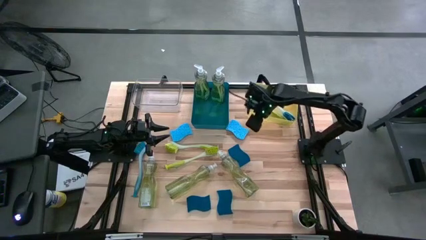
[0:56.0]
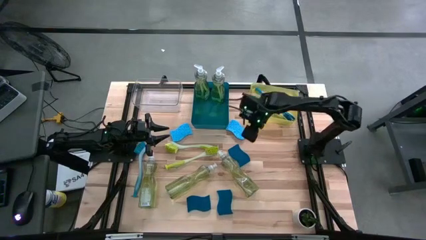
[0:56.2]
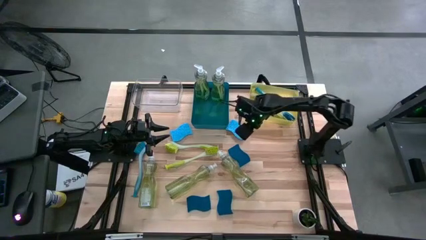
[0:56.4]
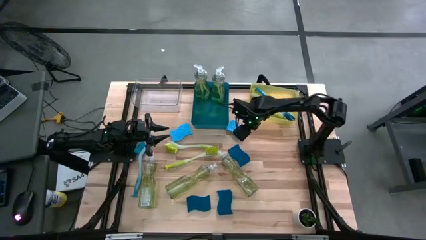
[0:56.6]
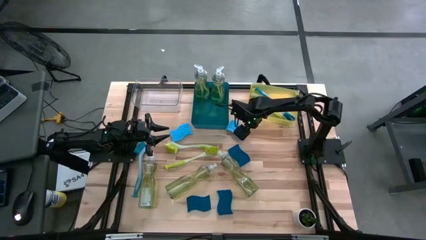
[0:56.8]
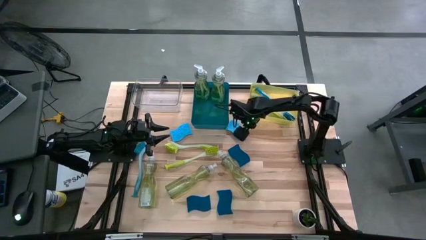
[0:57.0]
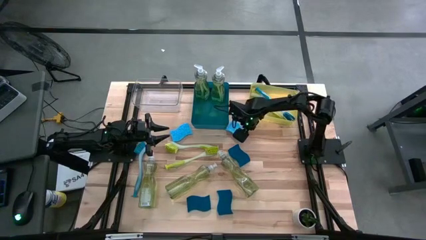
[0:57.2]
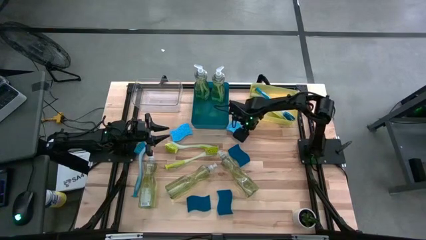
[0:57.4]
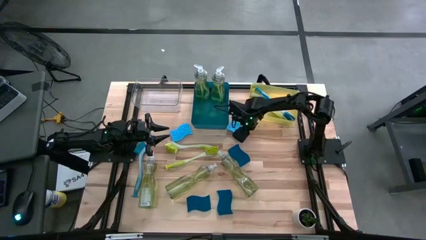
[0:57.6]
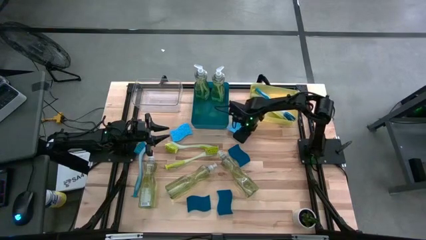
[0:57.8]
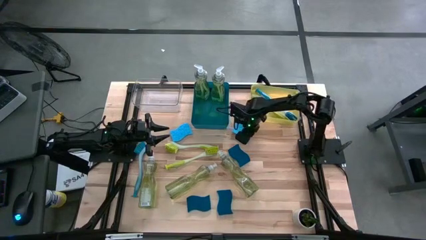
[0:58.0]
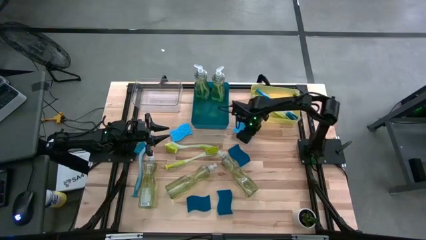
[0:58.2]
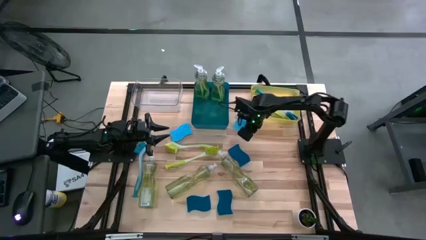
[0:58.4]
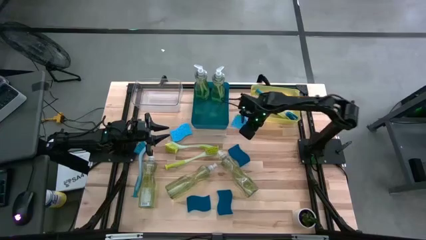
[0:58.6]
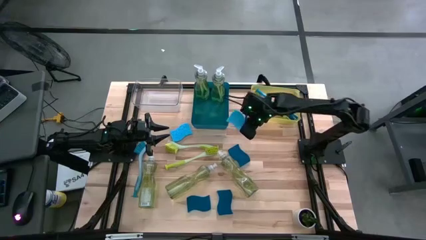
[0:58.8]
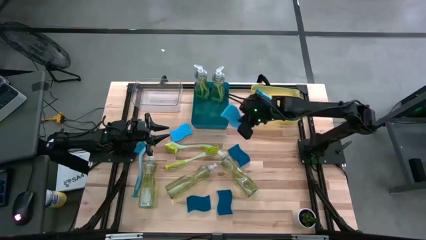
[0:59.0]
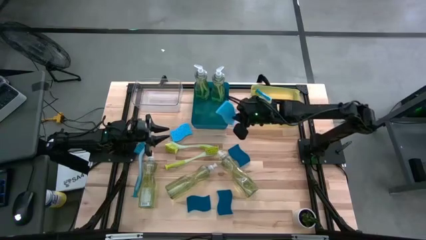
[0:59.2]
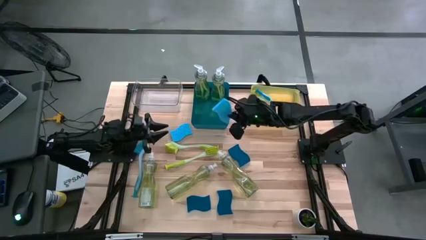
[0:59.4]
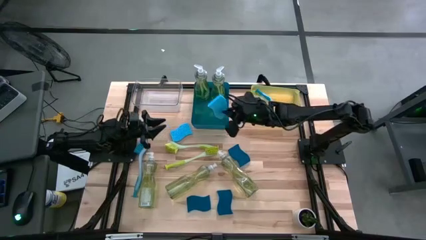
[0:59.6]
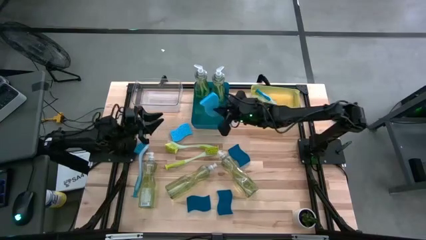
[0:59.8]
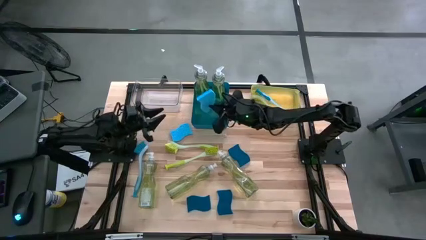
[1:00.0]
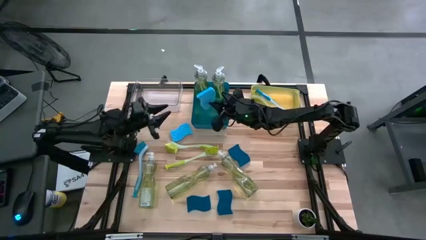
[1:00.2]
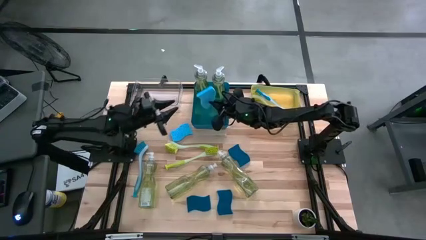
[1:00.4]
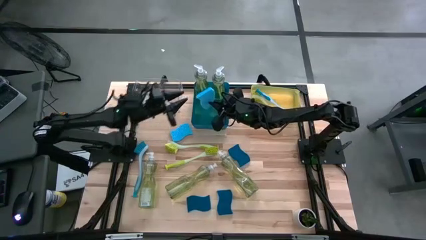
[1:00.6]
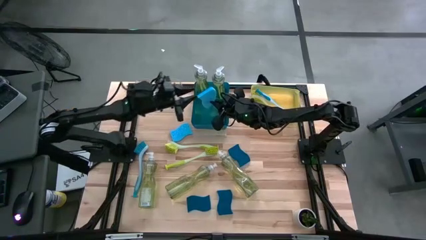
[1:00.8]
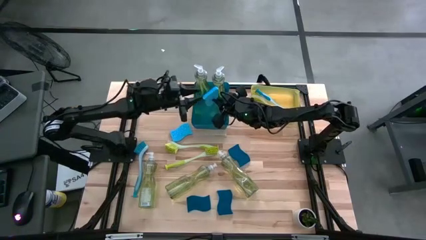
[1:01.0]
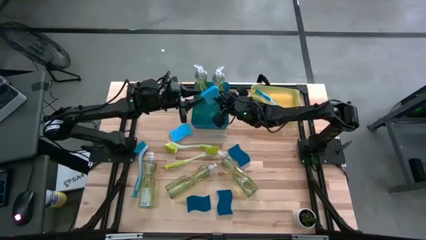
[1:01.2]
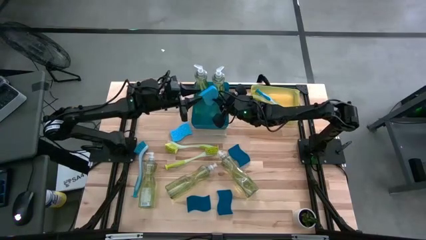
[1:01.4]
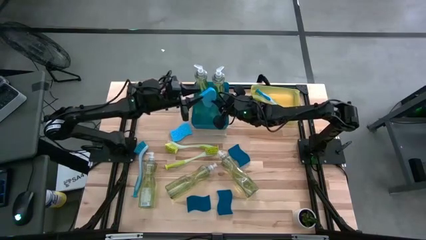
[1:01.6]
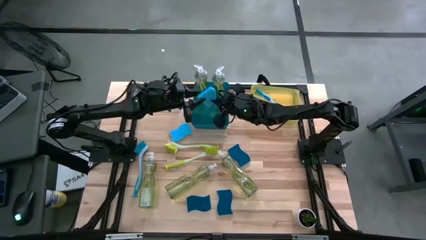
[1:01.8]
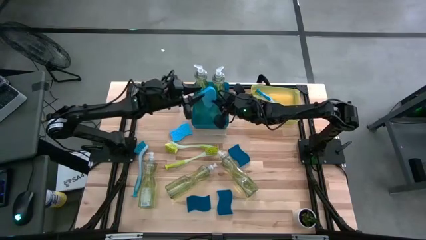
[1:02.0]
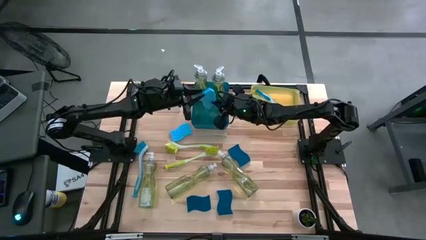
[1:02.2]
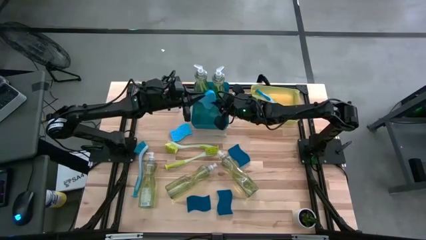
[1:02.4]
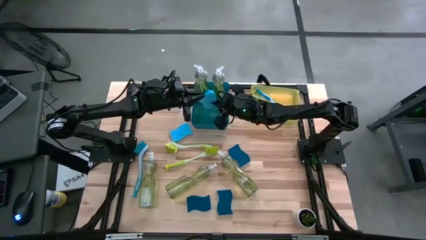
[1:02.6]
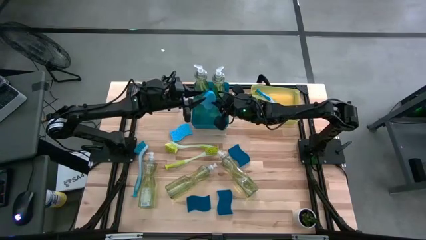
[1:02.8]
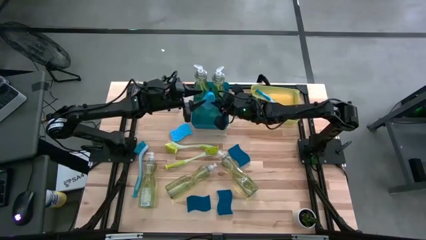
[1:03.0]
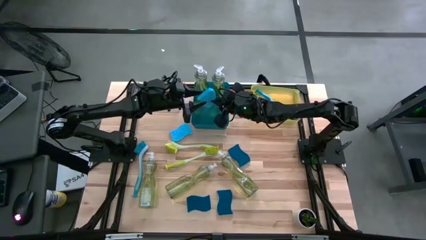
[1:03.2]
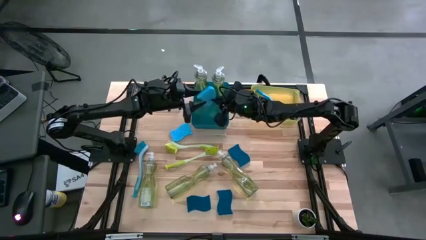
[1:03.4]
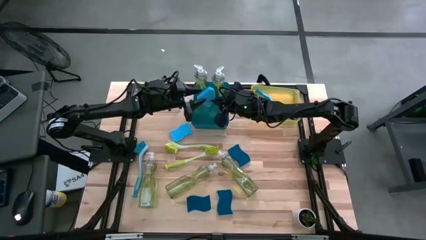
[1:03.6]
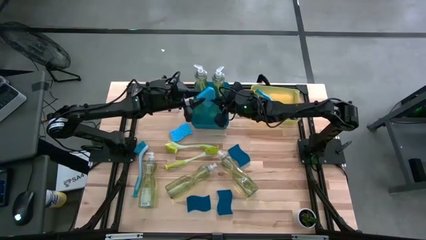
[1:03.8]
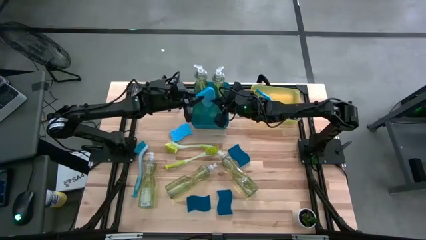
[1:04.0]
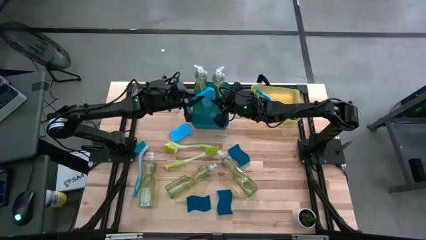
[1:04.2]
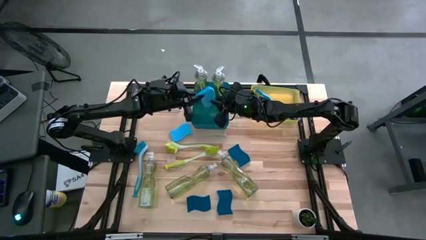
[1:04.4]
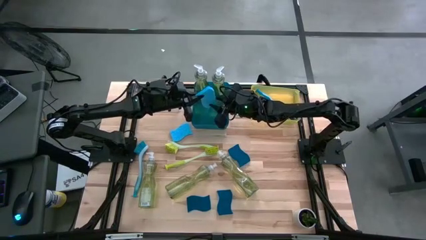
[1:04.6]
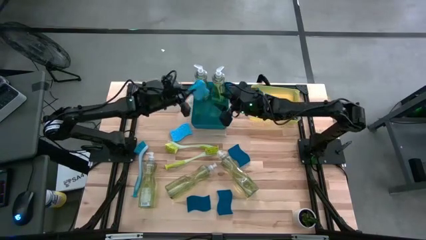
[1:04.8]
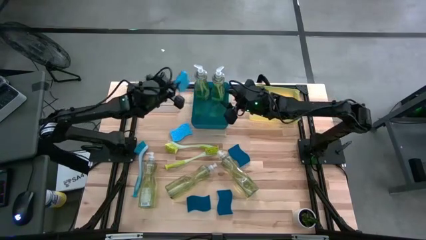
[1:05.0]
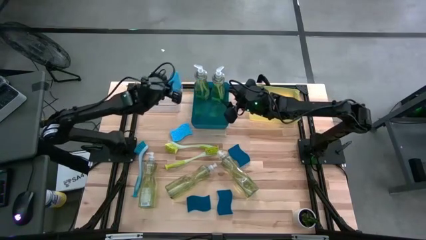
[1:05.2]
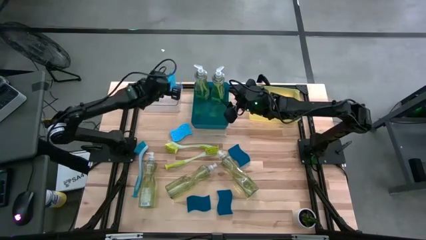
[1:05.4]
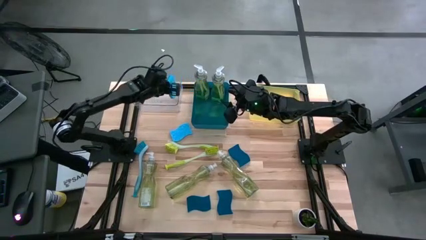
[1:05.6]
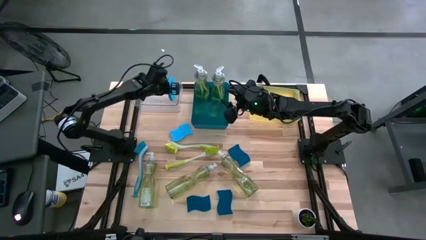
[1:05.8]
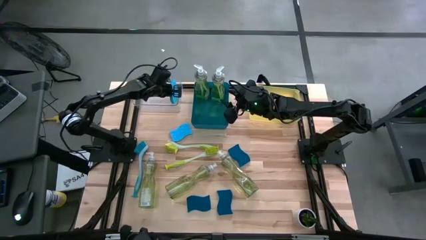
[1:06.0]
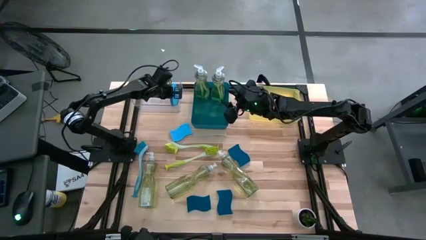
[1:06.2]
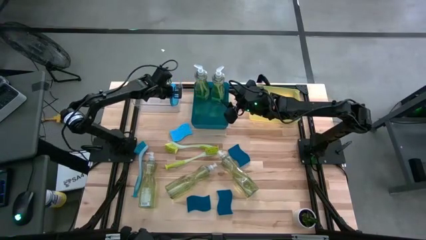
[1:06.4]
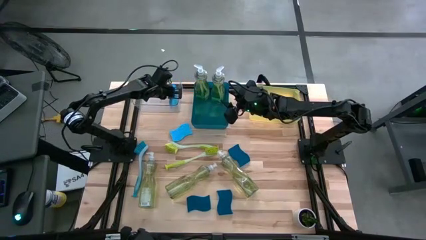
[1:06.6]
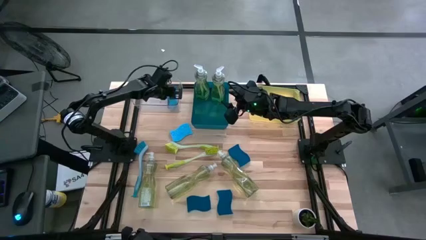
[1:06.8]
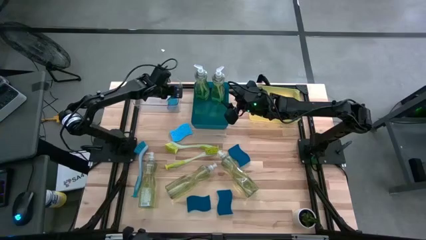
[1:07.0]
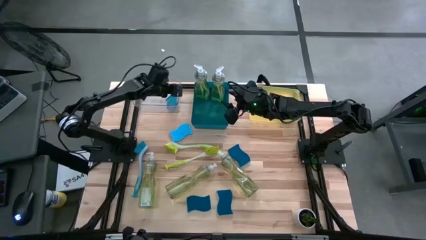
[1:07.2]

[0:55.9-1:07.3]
Task: Pick & Place Kitchen Sink Supplies
Put the blue sponge into the transparent bin

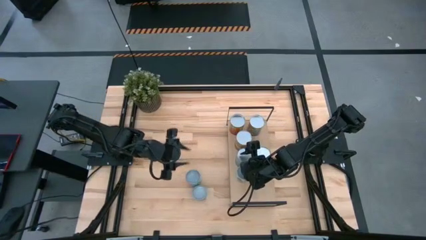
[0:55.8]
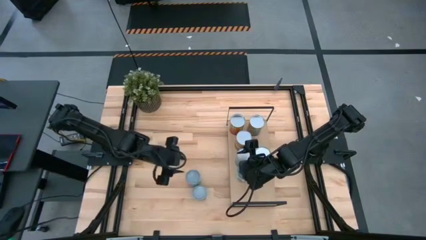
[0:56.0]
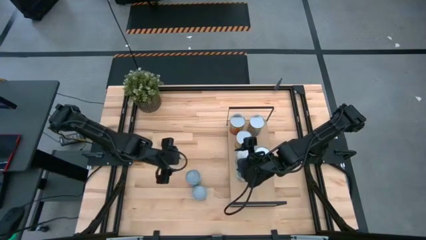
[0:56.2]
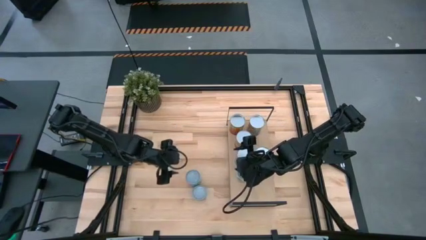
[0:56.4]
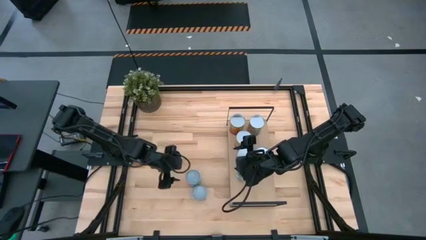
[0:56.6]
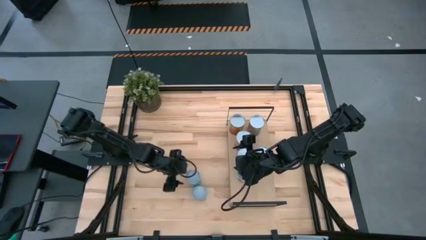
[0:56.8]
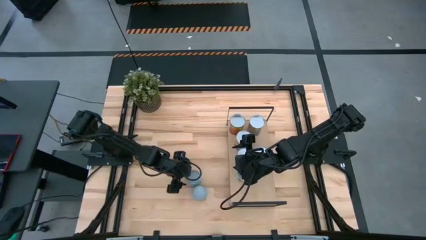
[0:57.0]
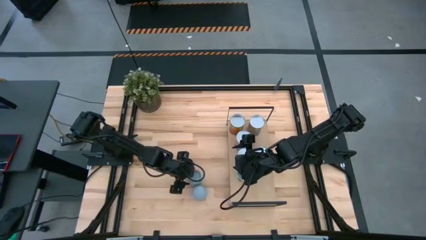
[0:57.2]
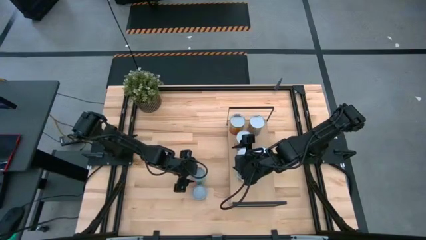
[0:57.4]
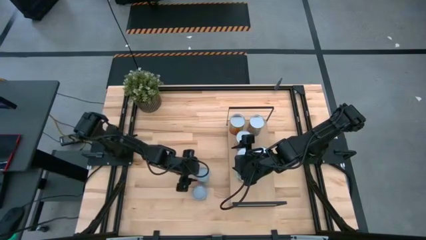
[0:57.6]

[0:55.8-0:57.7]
Task: Pick and place cans onto a shelf
Put the canned chicken soup on the shelf
